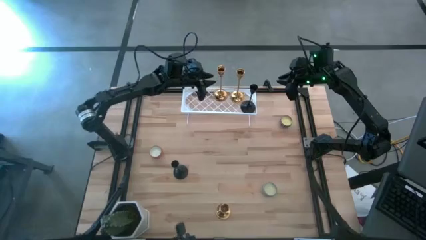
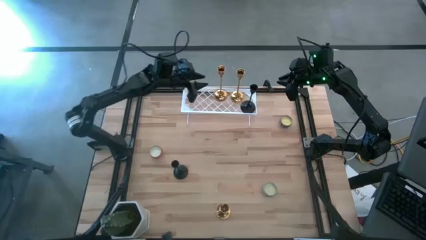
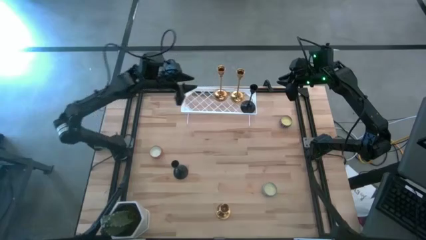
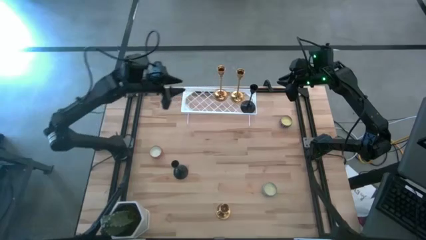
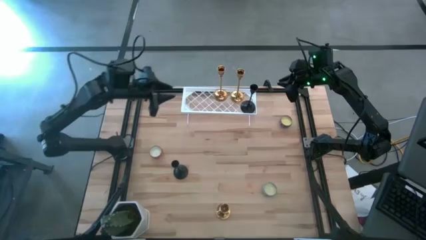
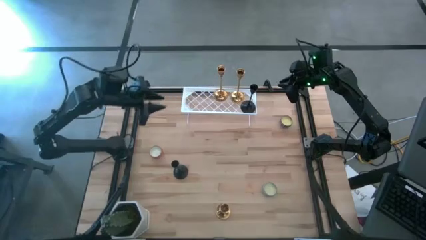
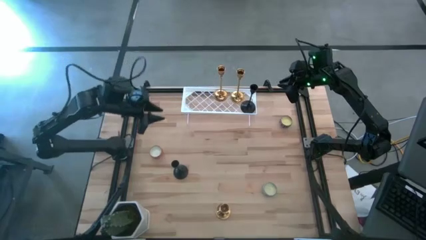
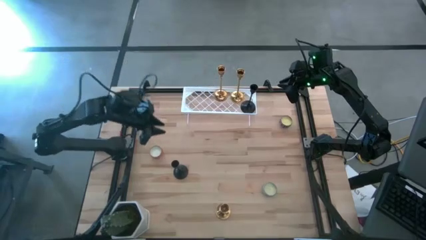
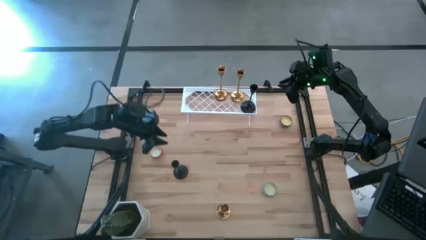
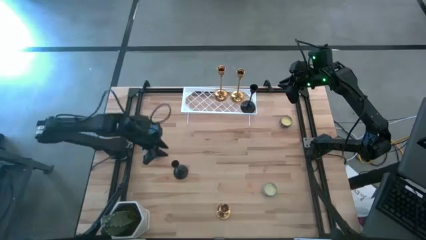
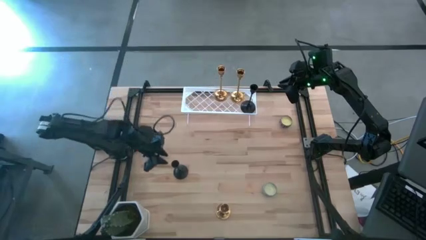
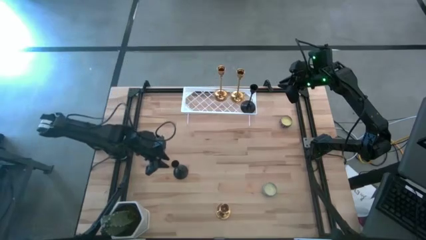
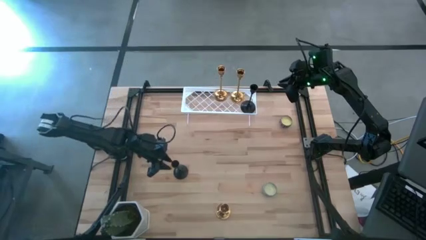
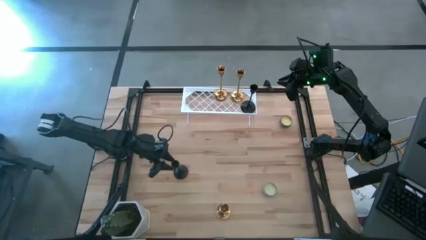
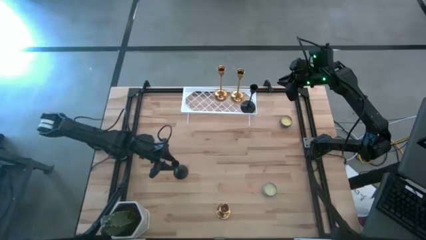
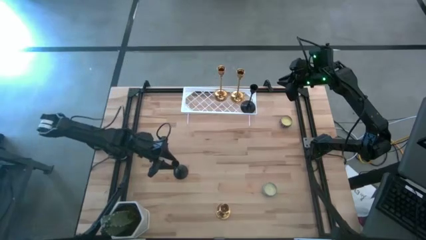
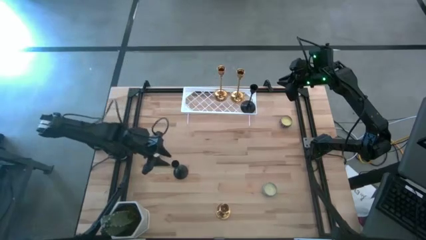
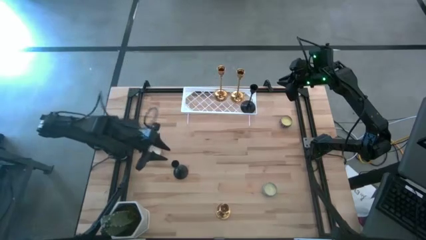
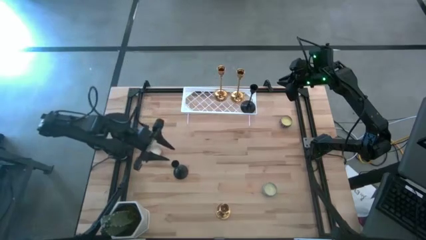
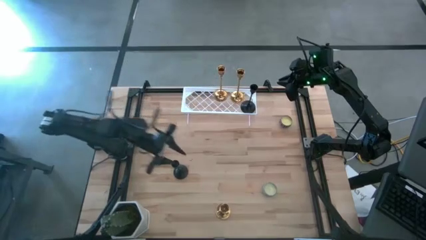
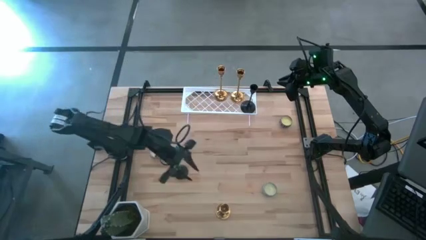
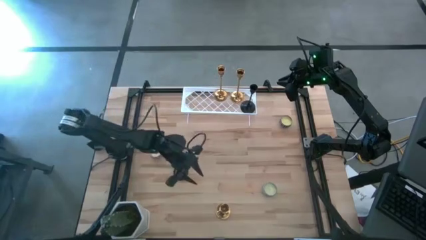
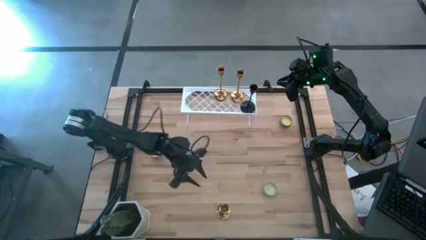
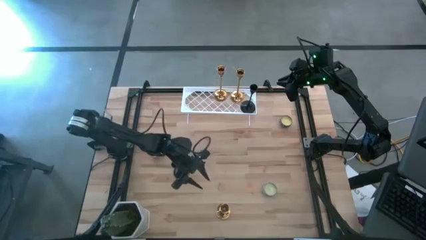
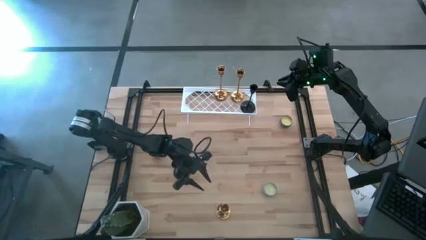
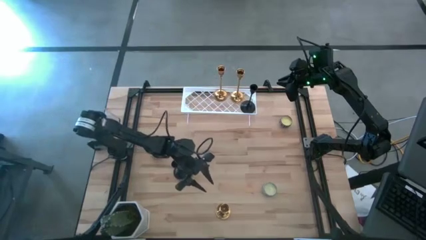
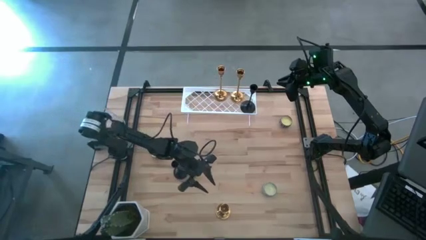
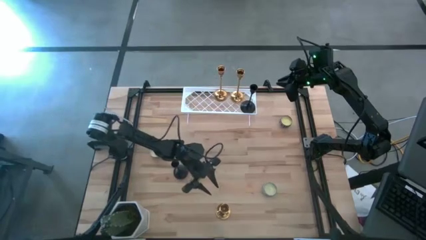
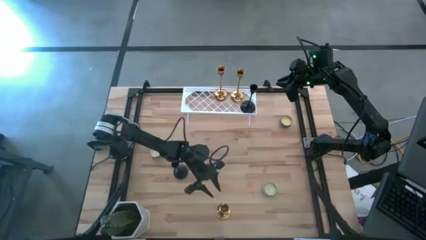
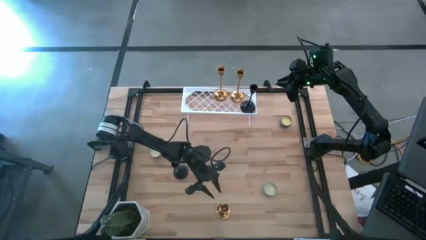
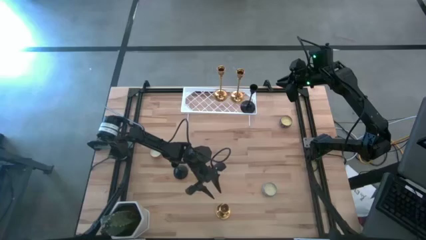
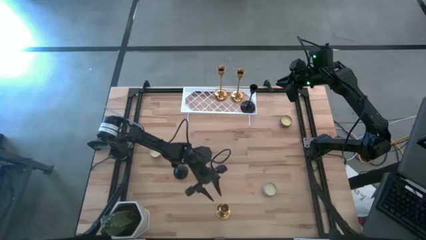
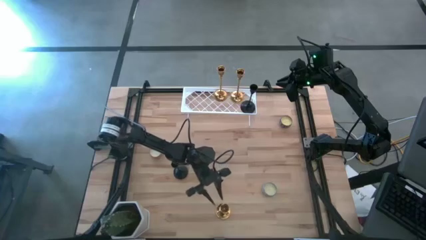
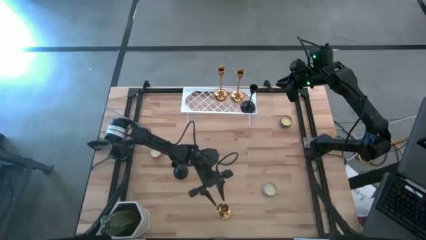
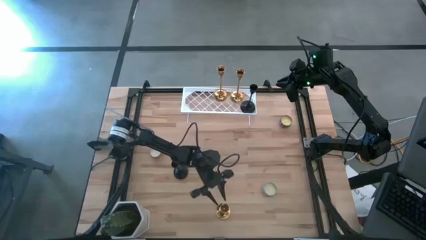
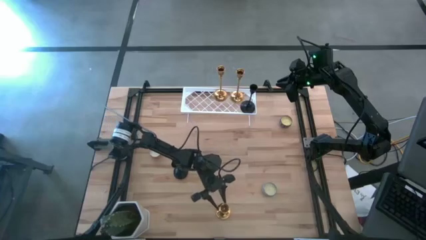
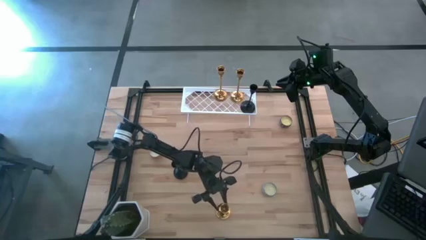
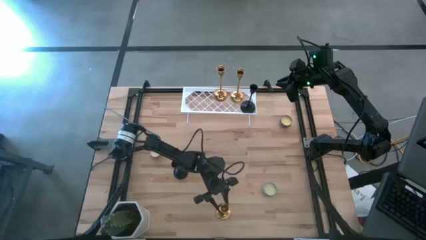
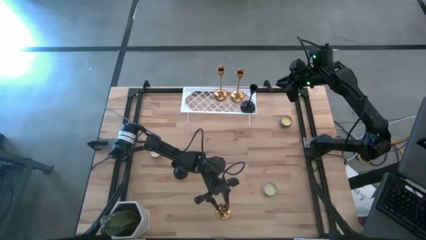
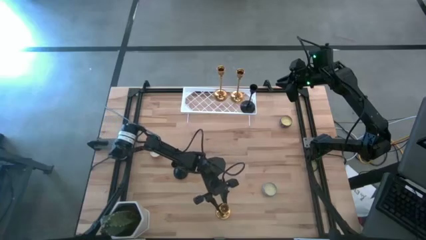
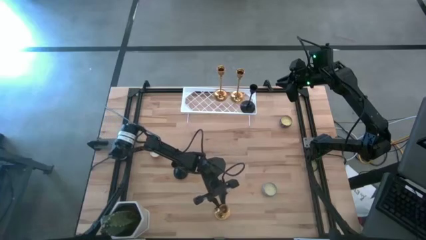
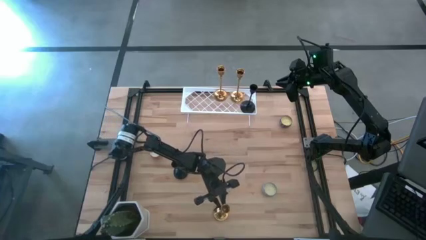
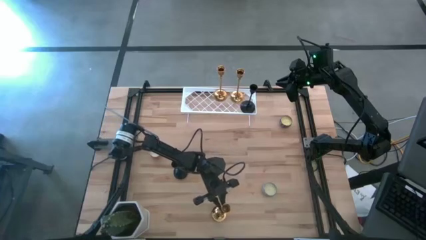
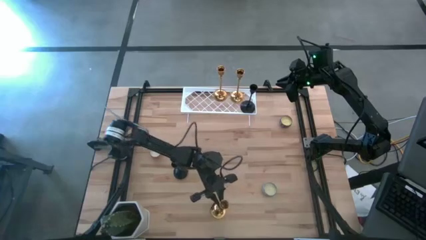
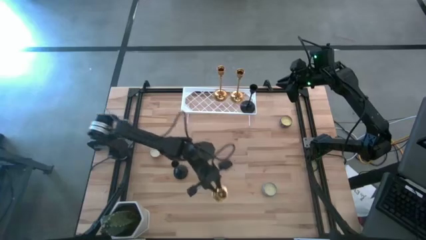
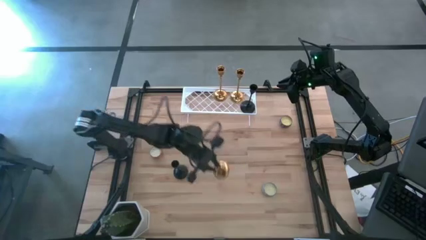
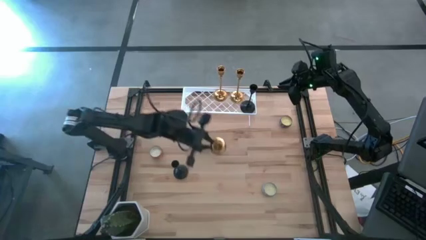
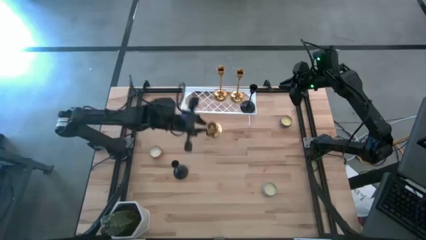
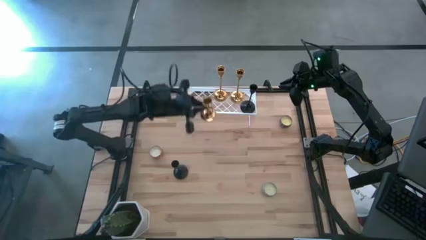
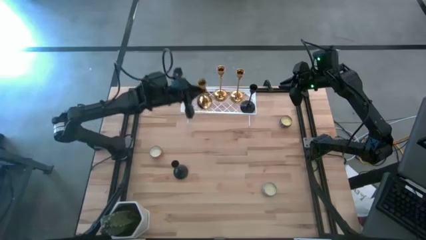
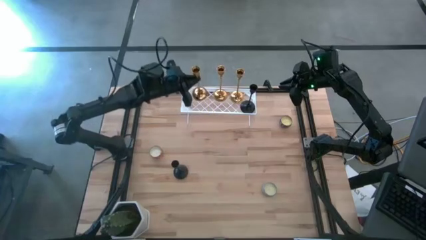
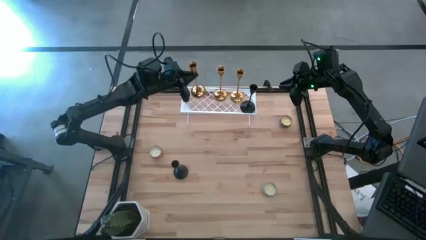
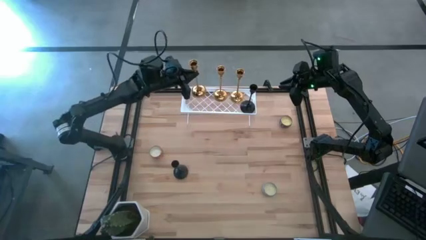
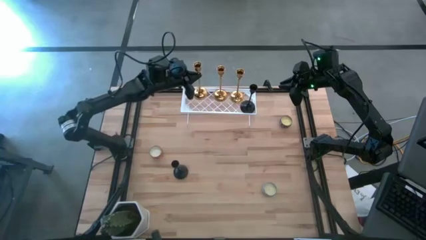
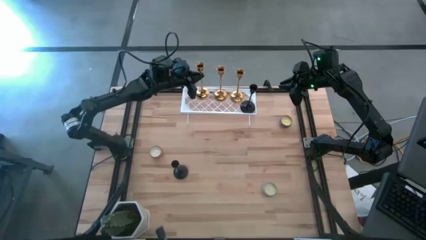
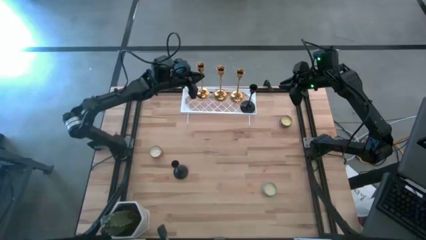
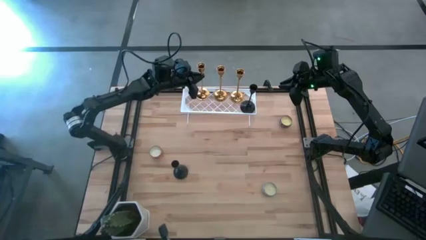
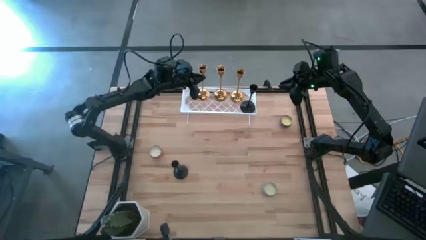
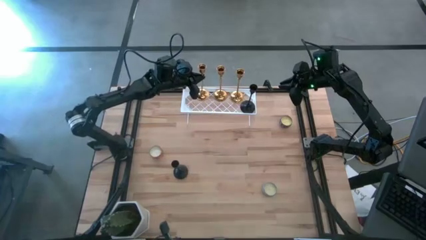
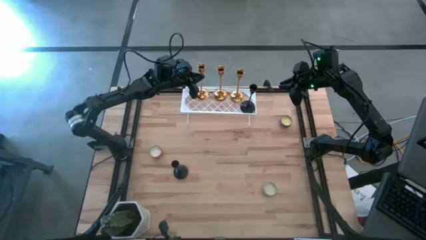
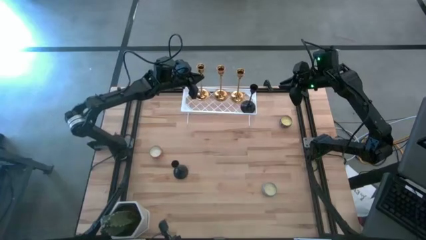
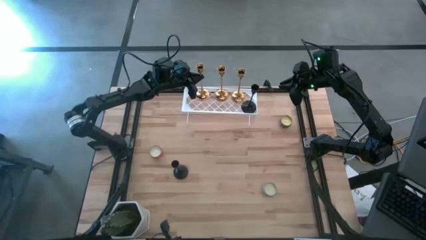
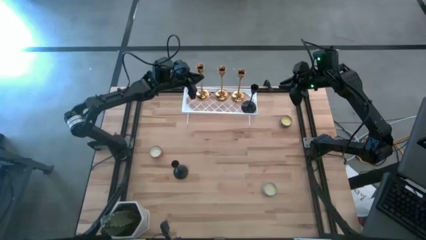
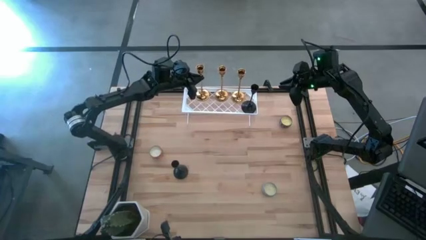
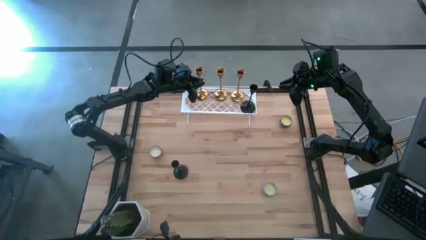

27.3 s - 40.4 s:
Task: Pick & Place candle stick holders
Put the gold candle holder on the shelf

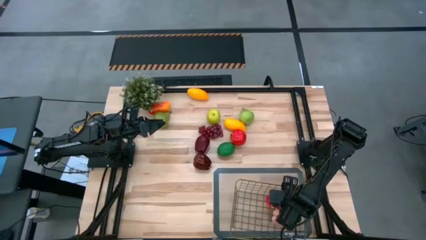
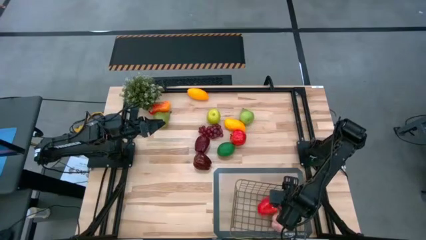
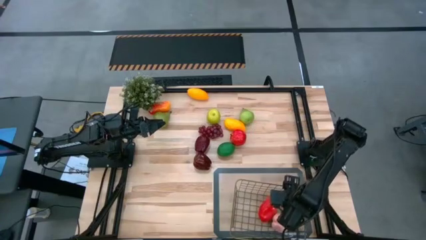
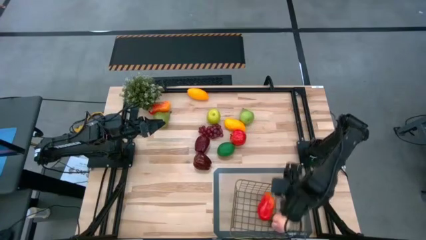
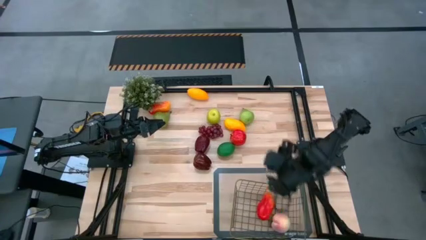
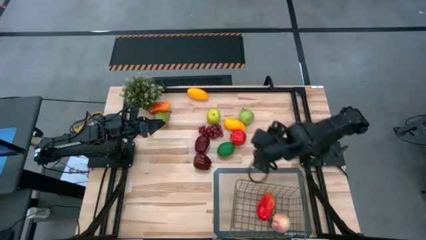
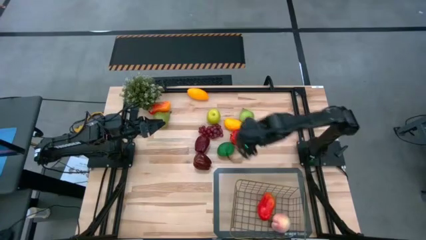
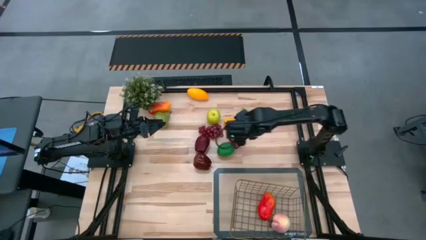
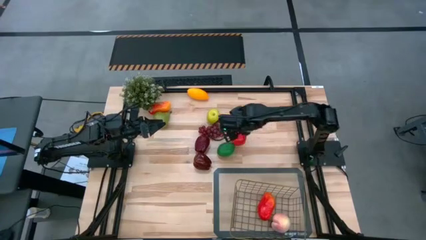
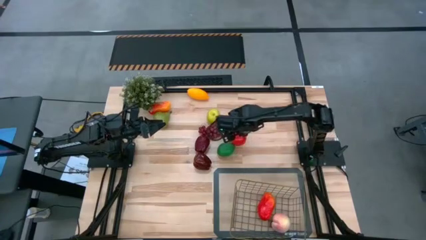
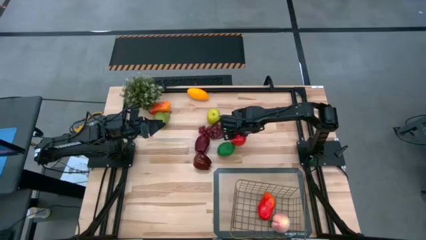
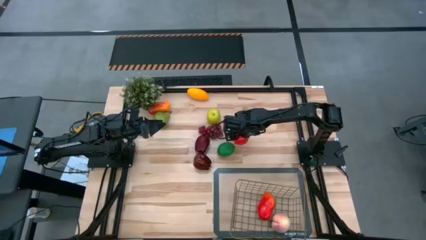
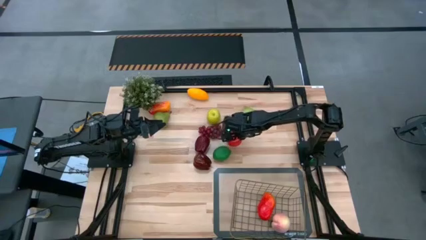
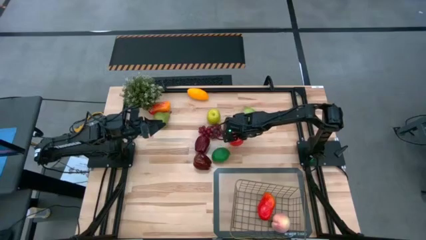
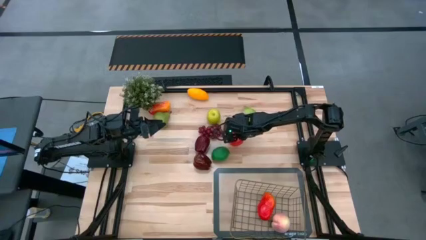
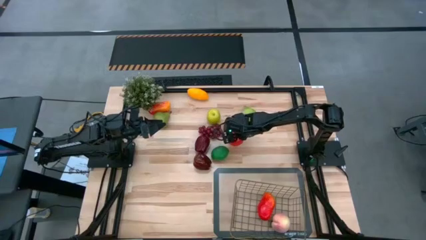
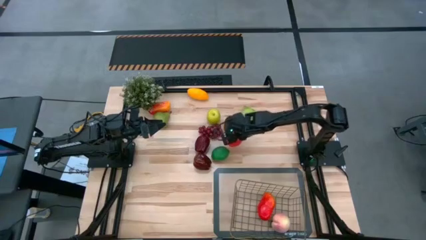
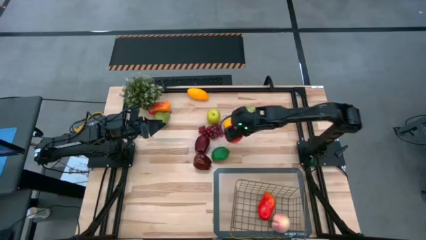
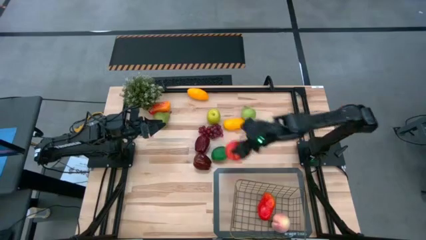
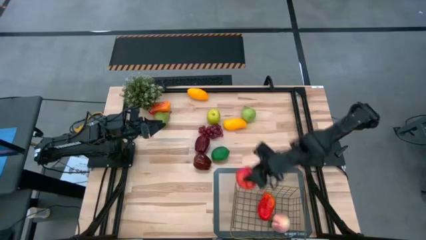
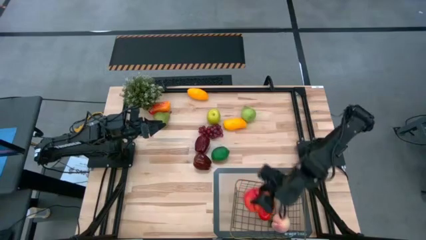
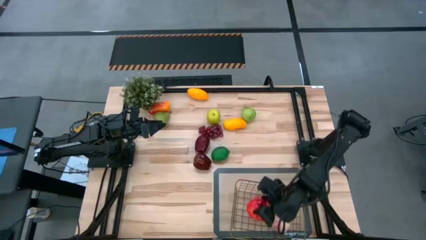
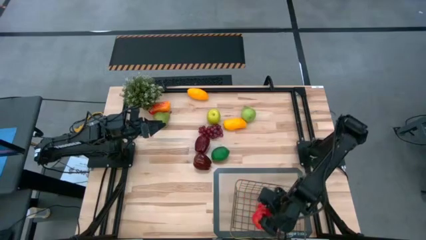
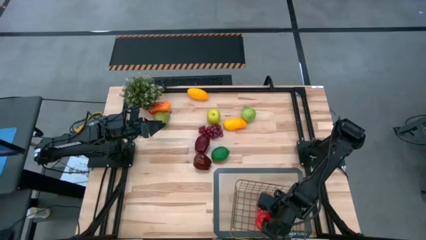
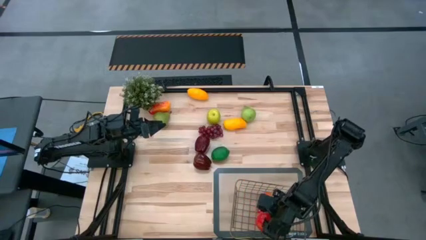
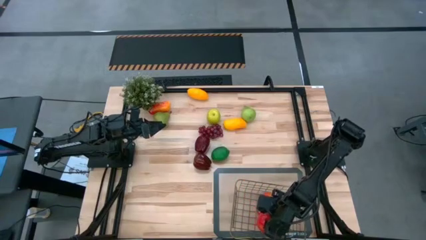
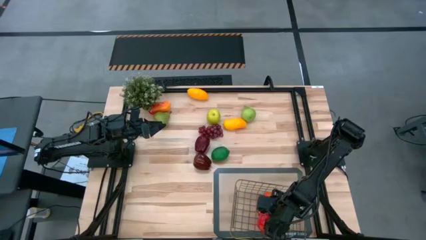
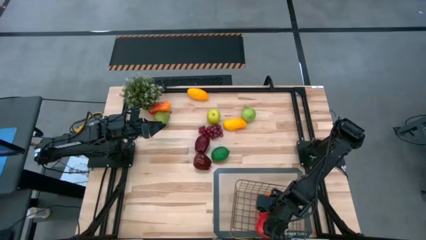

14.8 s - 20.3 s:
Task: Build produce basket
Put the red apple into the wire basket
